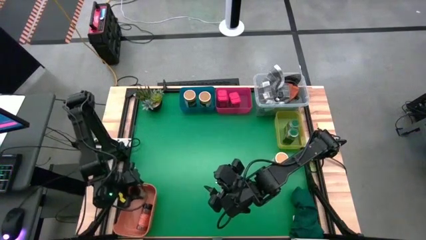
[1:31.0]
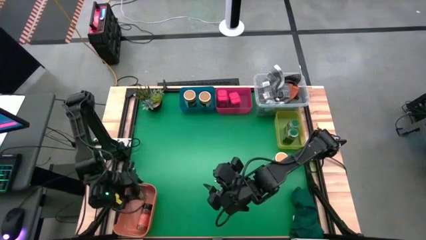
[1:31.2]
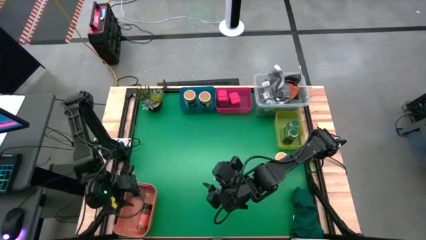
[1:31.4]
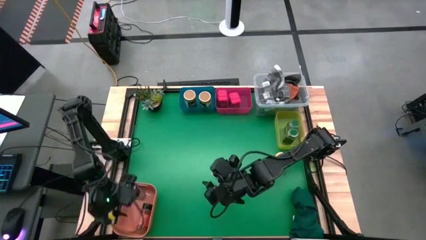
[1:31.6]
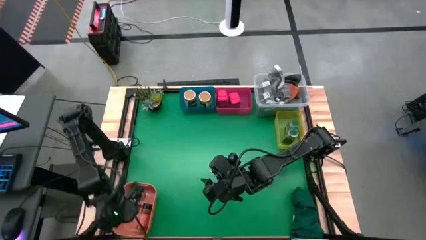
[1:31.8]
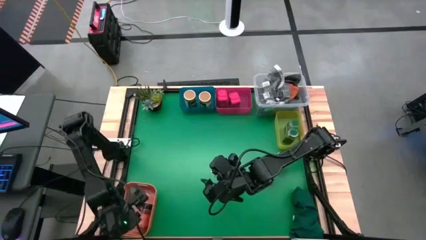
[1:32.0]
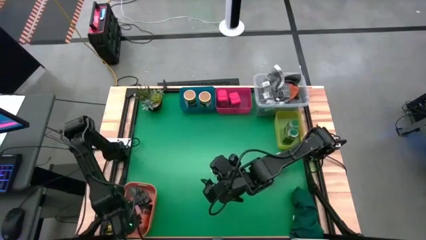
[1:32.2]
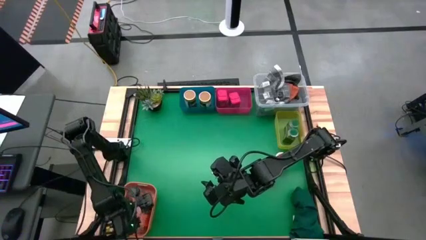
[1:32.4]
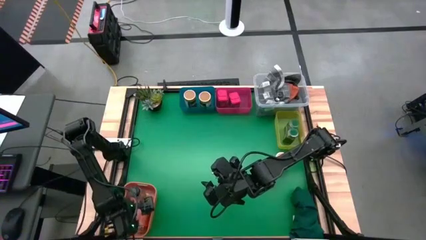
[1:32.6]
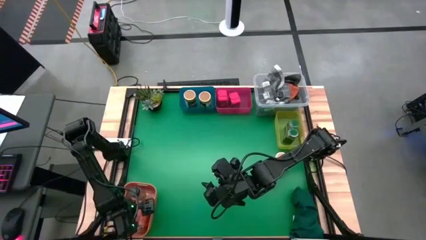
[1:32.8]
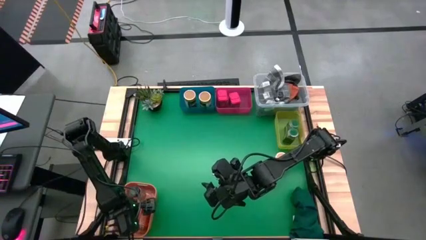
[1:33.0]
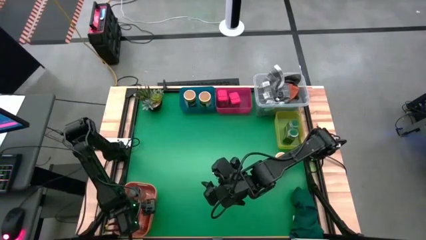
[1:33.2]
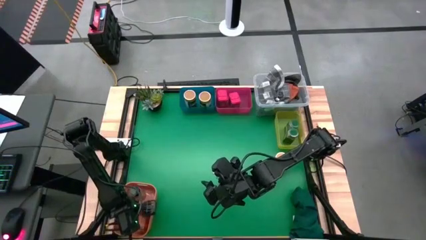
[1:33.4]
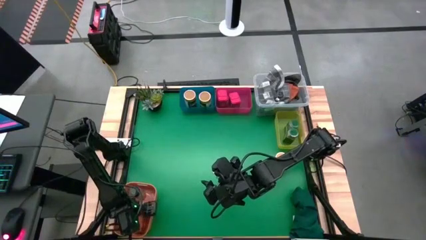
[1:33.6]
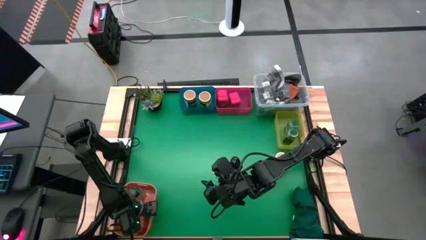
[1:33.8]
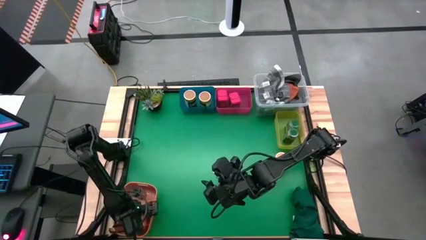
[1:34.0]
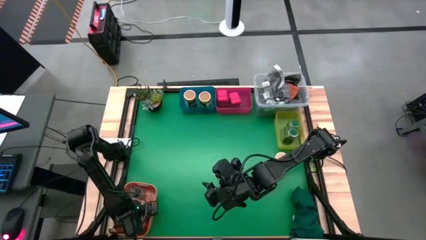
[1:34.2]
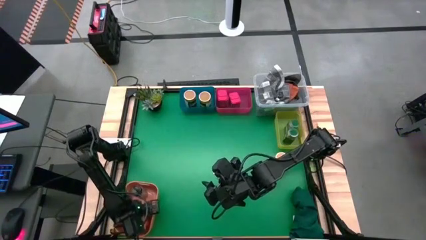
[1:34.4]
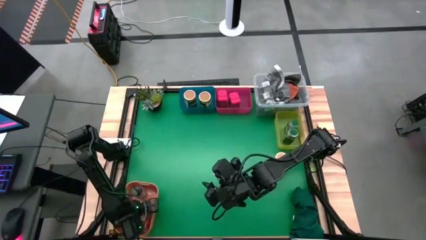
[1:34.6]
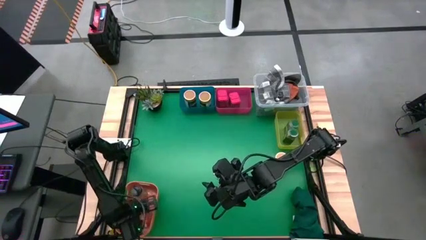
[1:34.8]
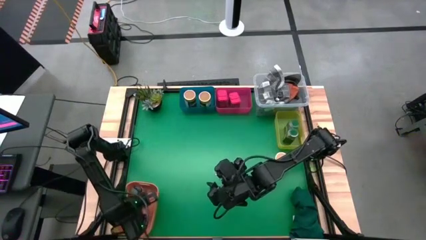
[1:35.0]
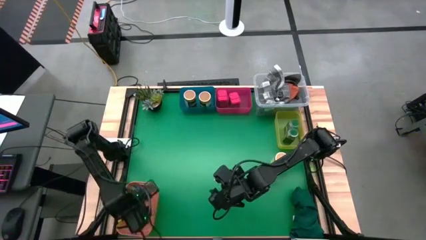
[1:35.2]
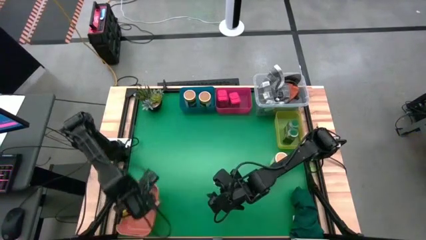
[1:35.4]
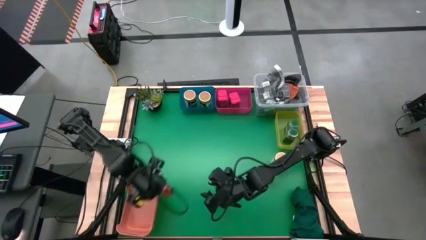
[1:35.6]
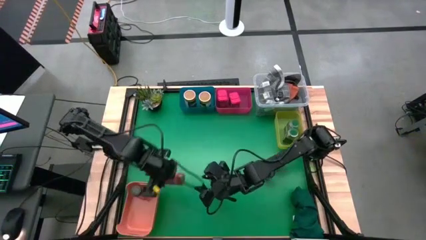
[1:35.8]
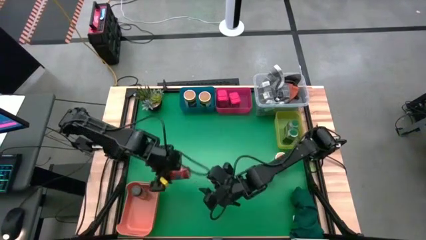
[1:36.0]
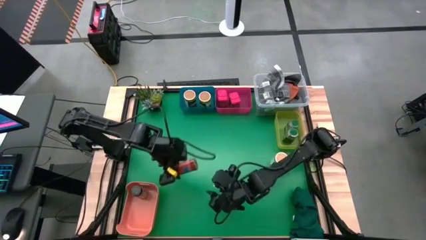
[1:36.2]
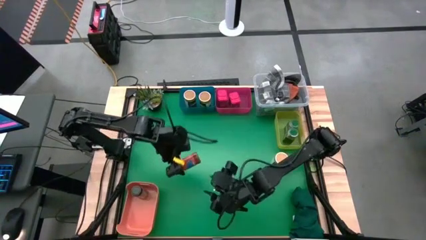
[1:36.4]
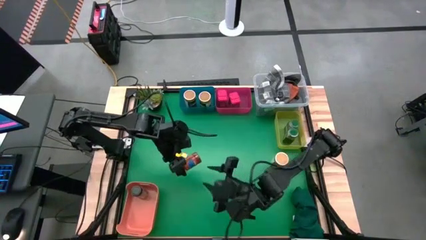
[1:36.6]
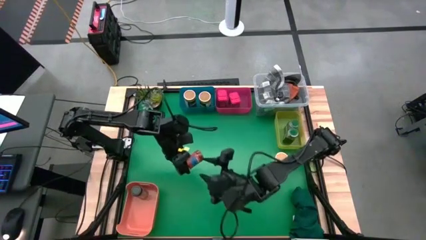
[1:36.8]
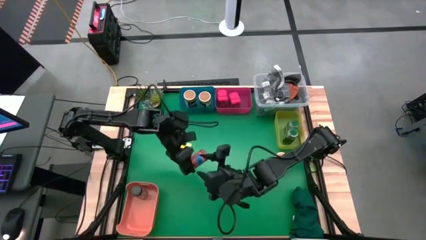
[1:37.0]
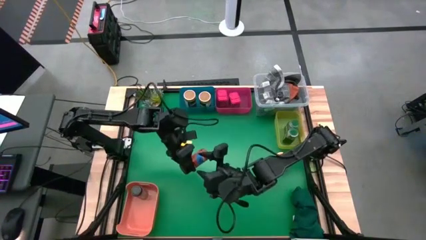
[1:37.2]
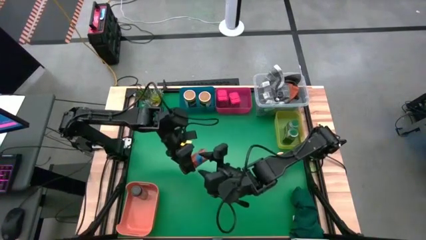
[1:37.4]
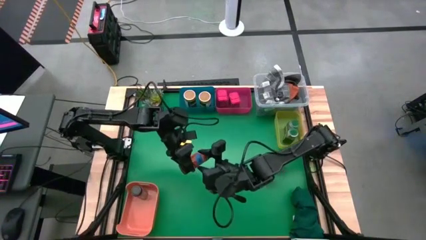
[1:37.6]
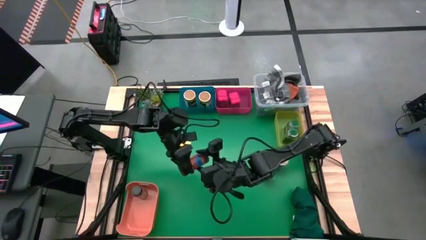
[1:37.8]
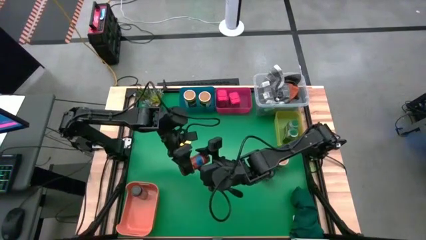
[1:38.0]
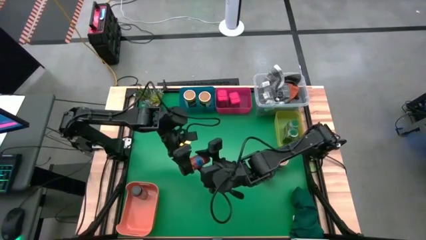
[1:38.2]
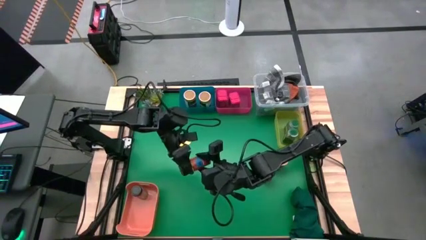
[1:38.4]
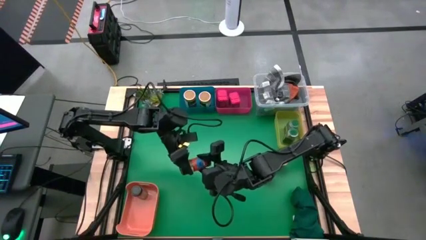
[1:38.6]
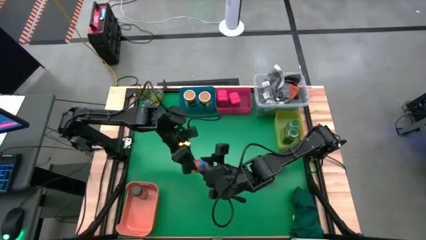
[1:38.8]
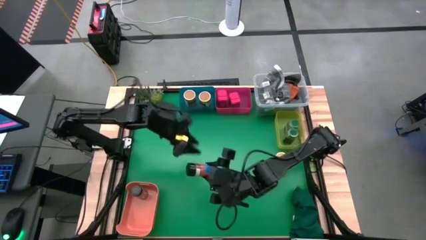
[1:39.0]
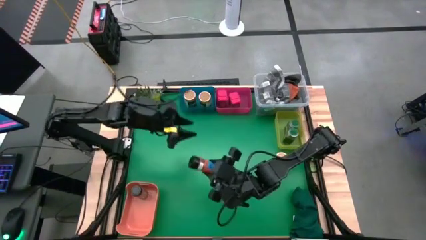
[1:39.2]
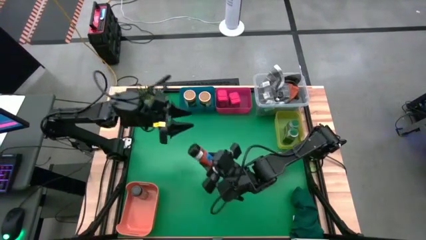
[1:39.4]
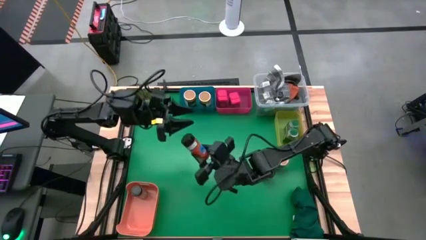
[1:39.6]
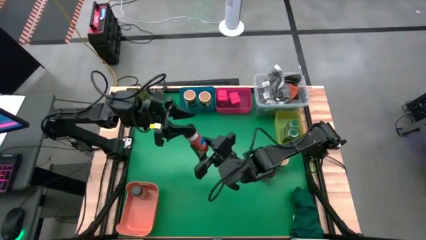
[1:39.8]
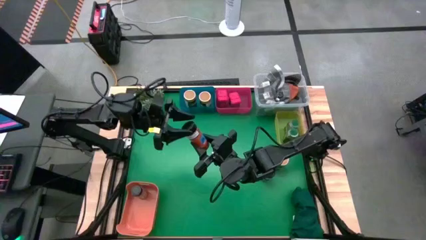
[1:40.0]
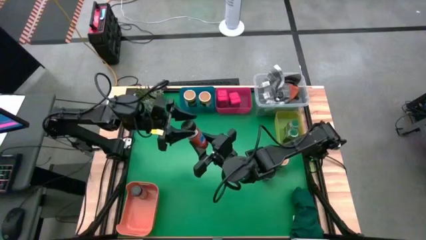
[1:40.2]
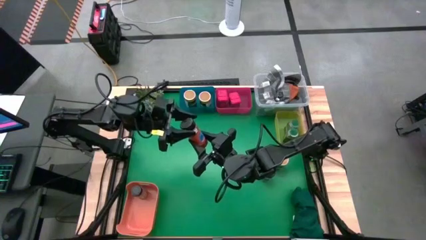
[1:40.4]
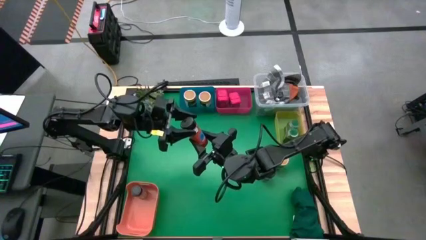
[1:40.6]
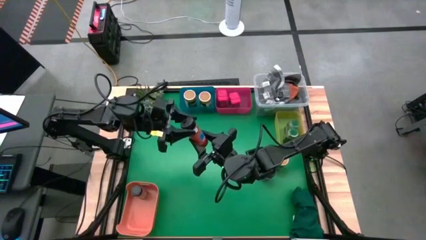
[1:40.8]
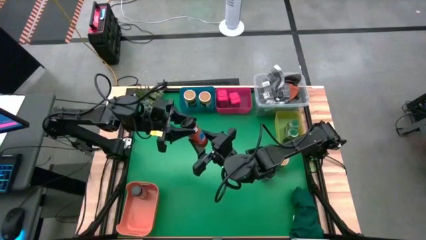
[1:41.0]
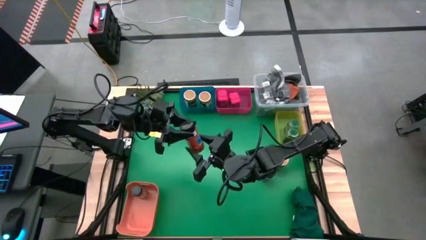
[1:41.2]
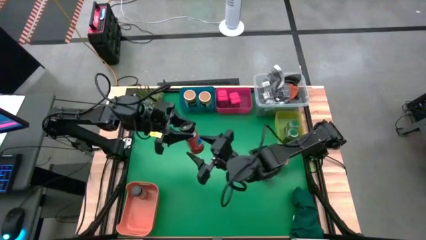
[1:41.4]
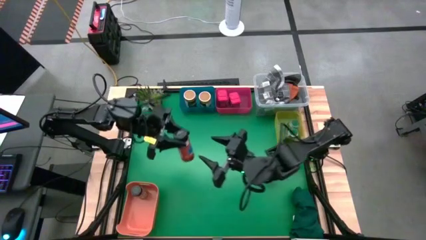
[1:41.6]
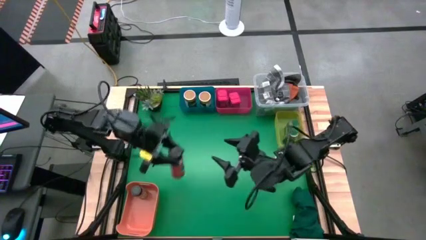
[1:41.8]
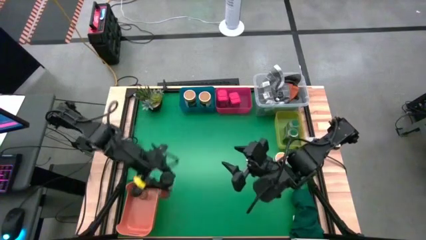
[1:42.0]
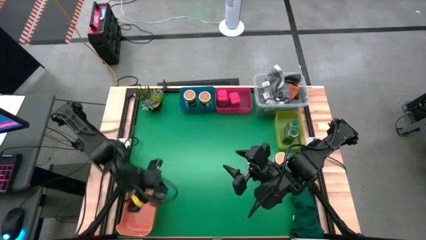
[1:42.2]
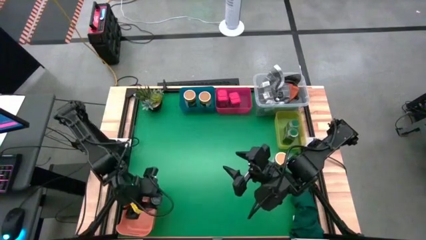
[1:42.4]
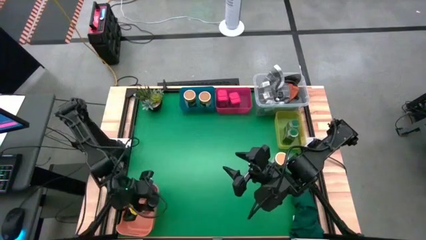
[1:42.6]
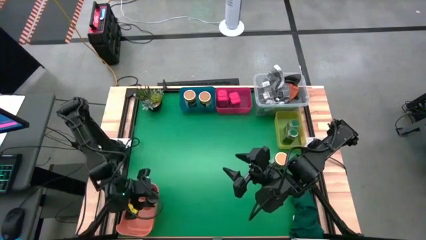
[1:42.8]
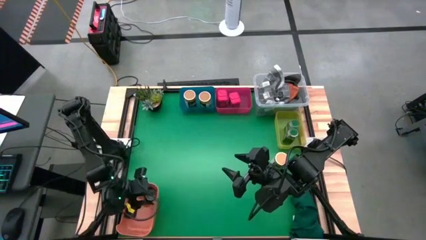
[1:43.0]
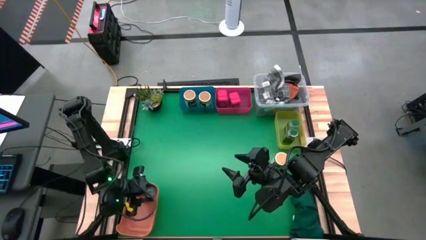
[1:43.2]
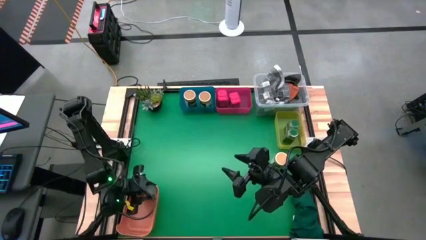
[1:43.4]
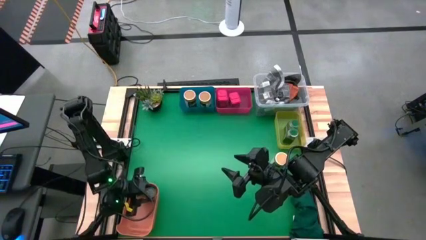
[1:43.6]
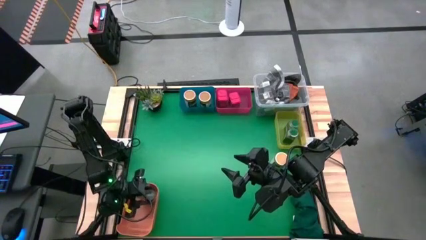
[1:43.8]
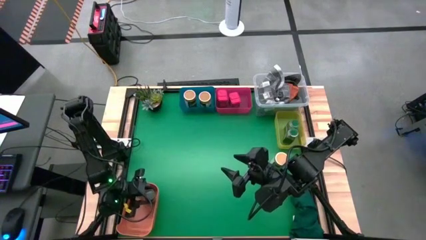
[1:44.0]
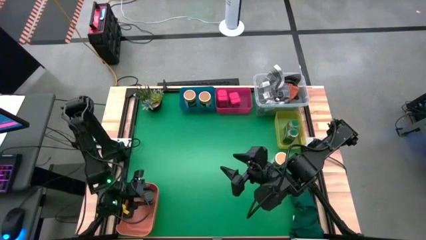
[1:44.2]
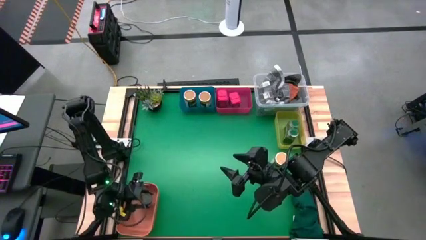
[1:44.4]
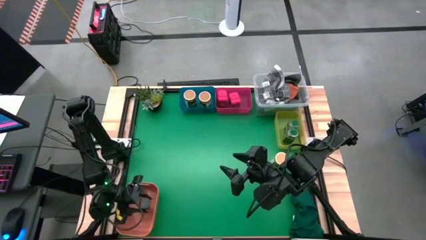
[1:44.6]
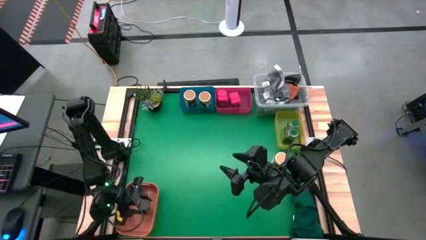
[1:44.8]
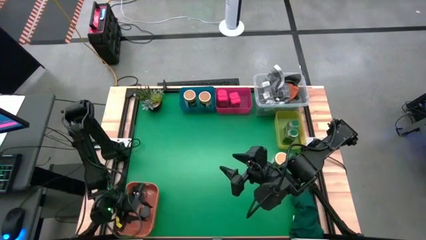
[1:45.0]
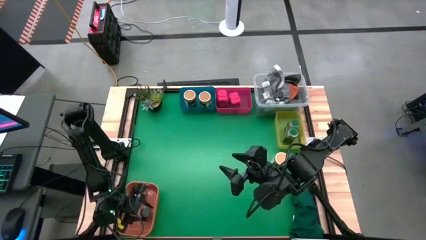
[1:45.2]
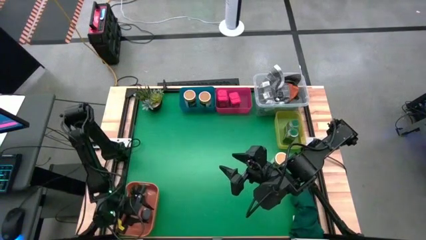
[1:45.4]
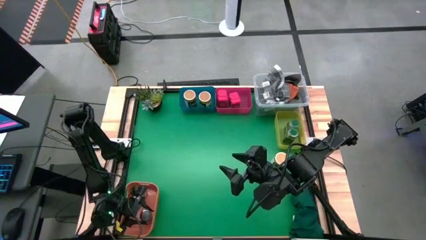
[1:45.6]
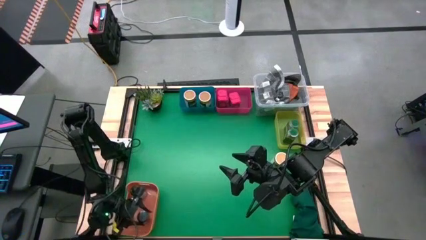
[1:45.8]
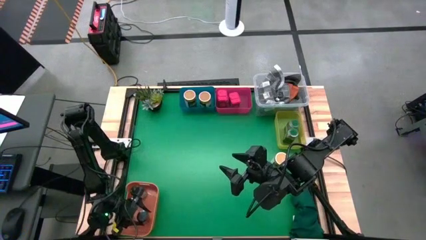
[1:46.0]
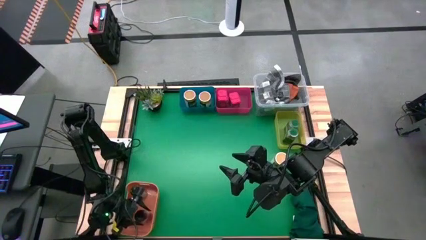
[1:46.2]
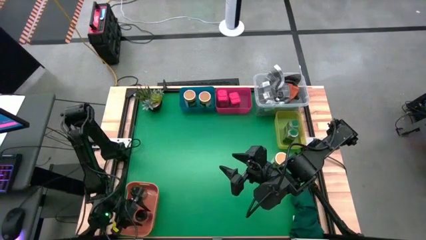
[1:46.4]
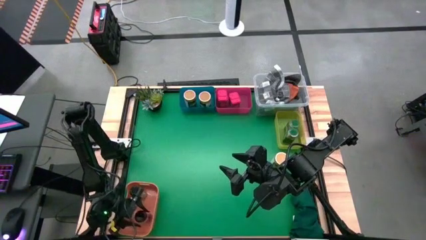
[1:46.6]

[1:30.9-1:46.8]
Task: Sort spices by type
Adjust the orange spice bottle in the orange bin
